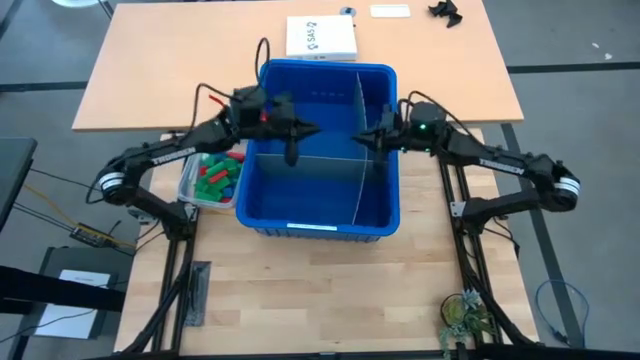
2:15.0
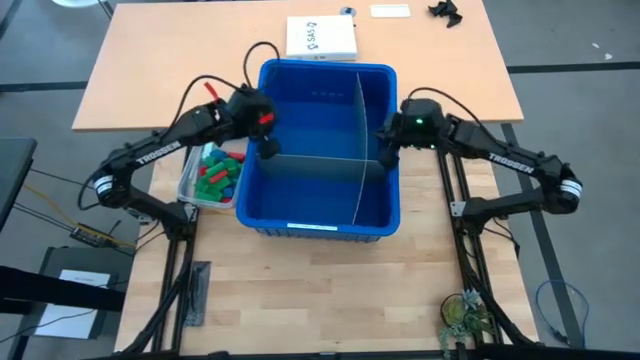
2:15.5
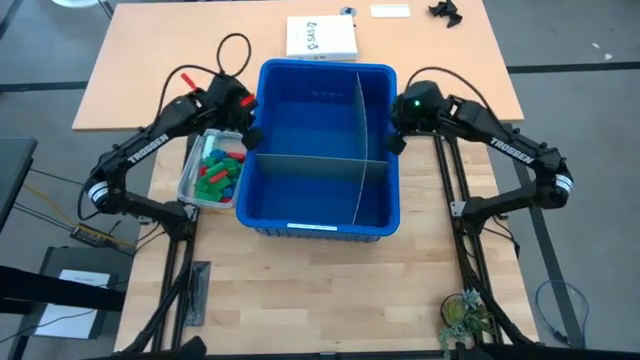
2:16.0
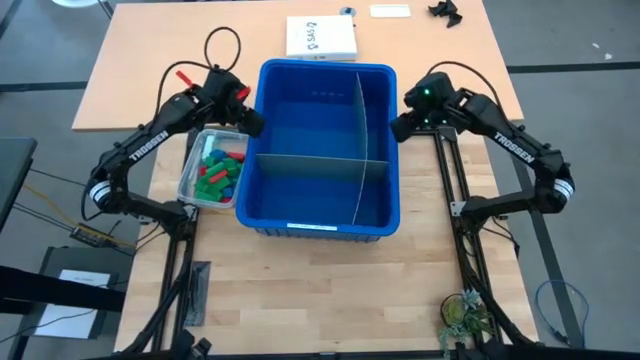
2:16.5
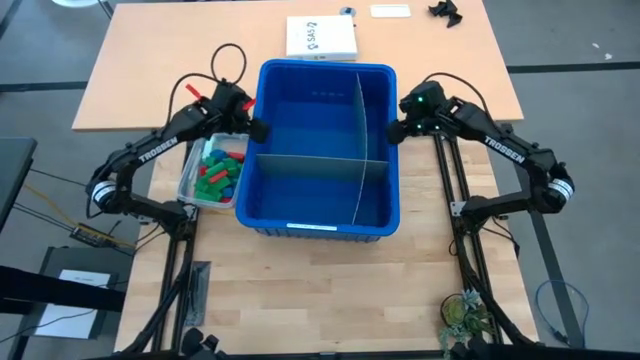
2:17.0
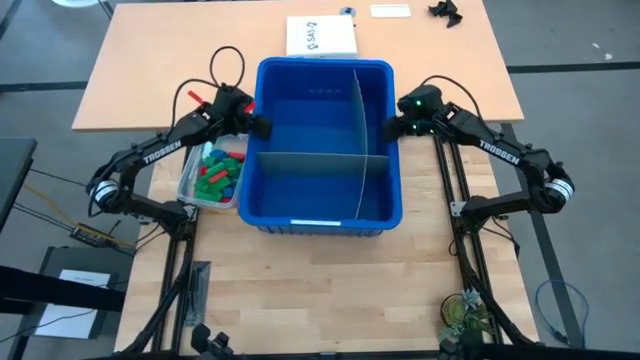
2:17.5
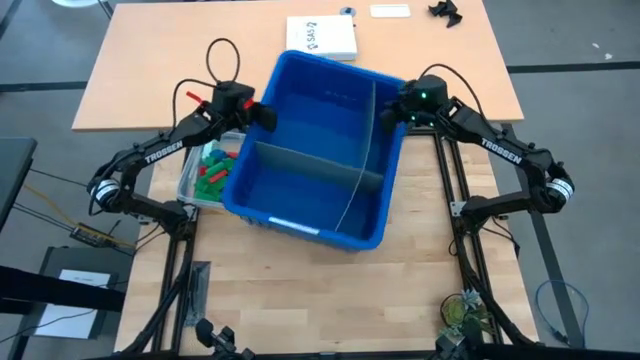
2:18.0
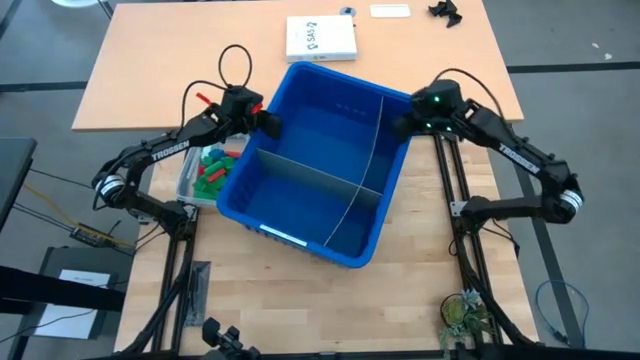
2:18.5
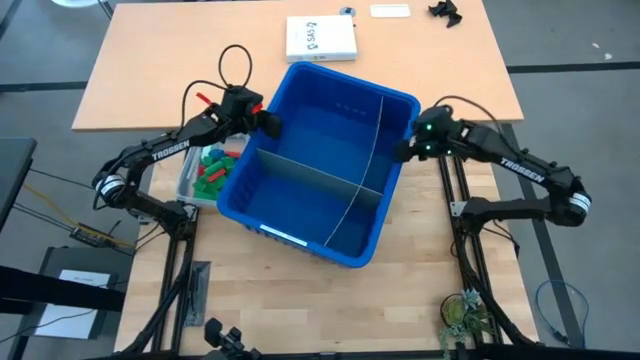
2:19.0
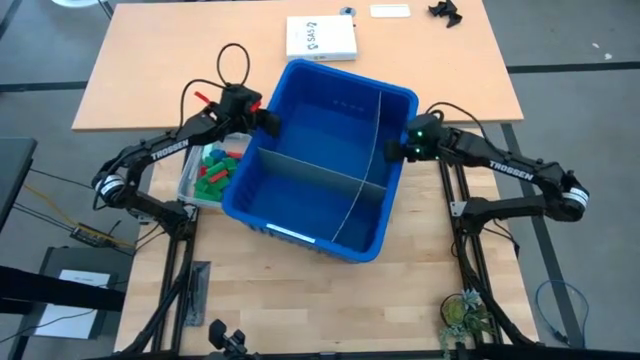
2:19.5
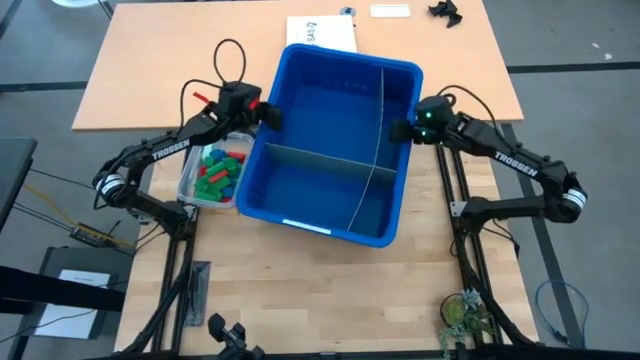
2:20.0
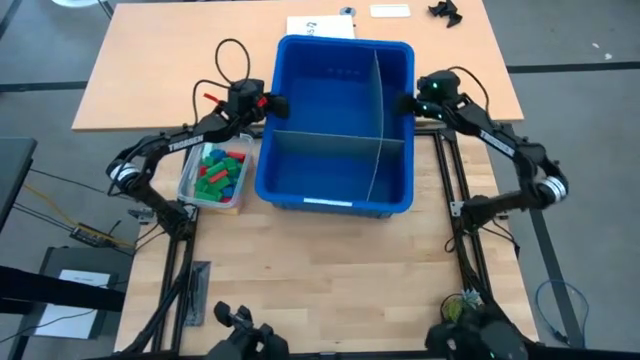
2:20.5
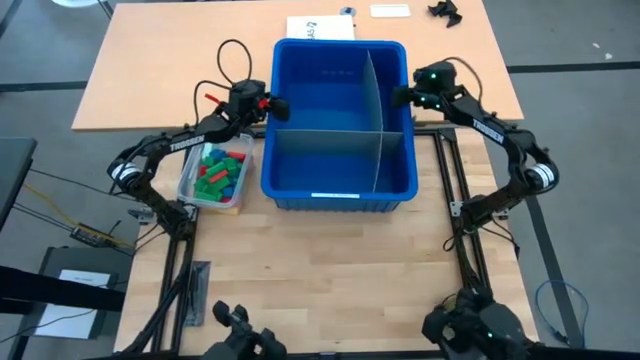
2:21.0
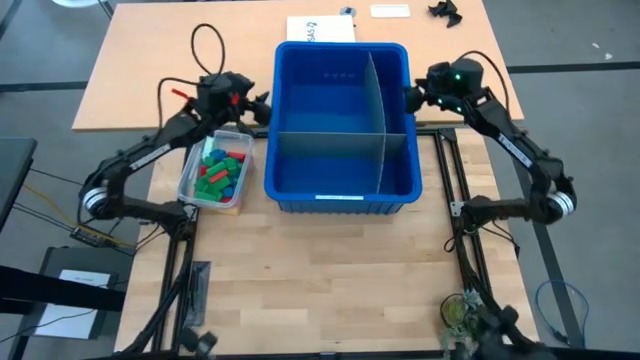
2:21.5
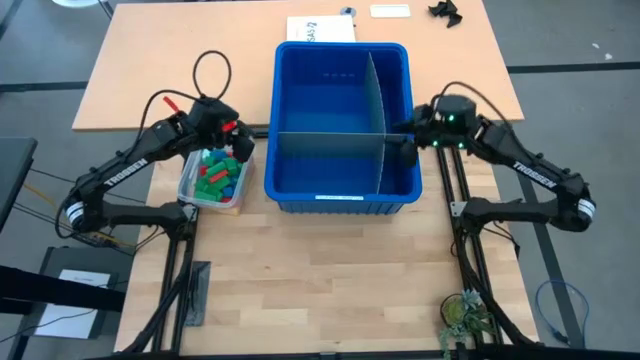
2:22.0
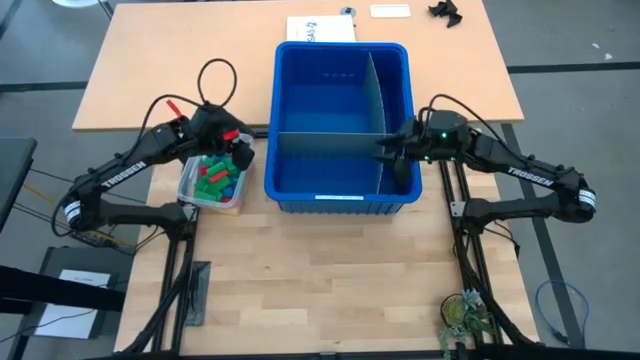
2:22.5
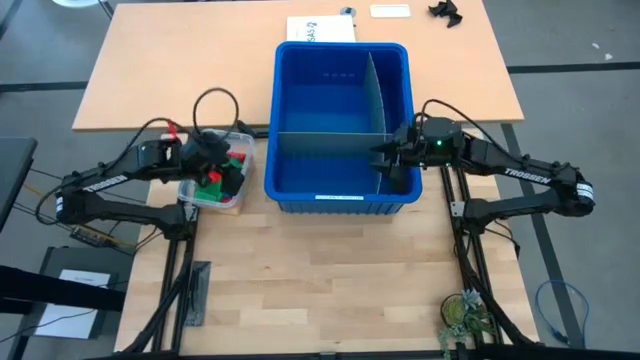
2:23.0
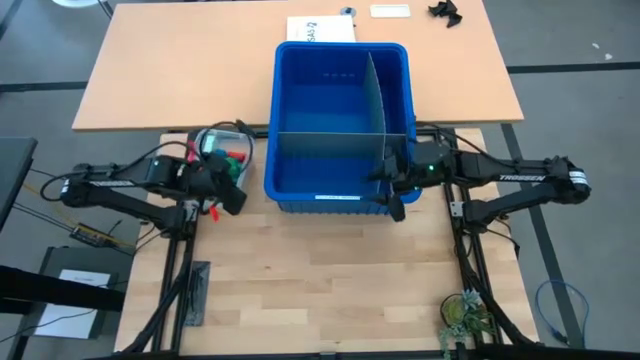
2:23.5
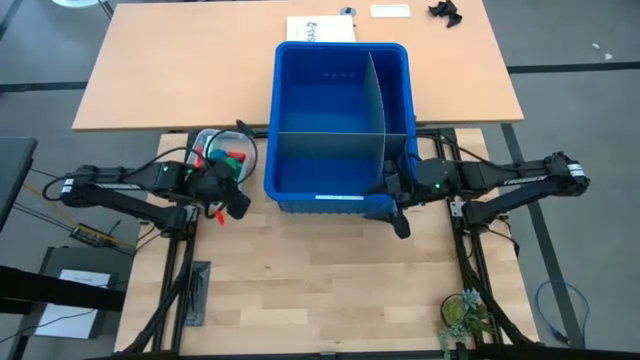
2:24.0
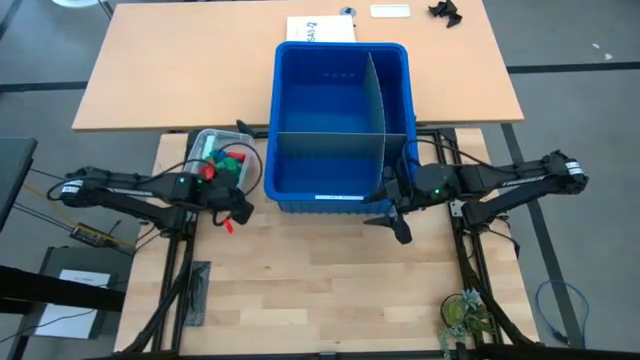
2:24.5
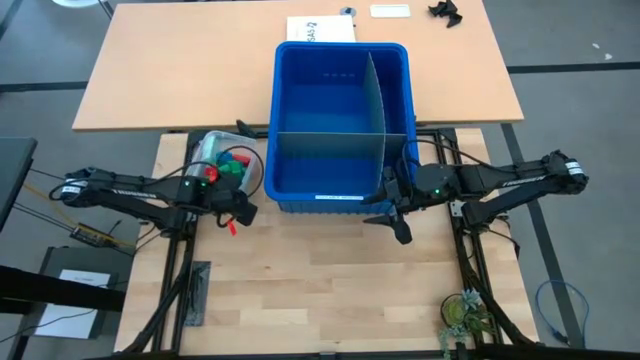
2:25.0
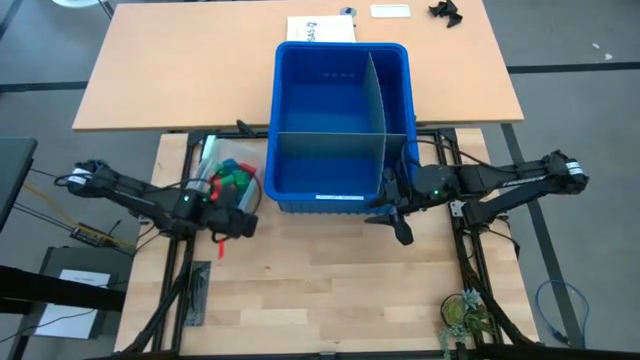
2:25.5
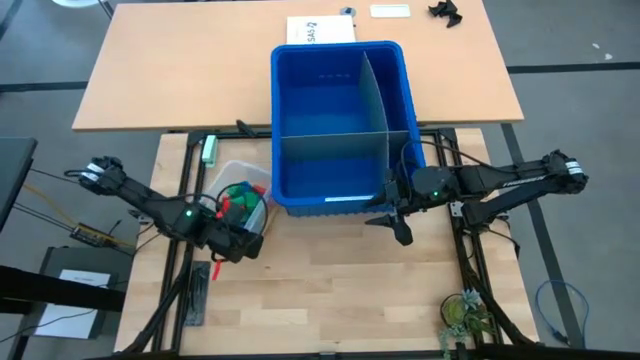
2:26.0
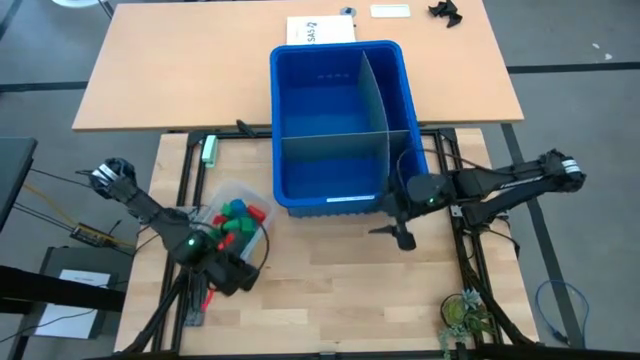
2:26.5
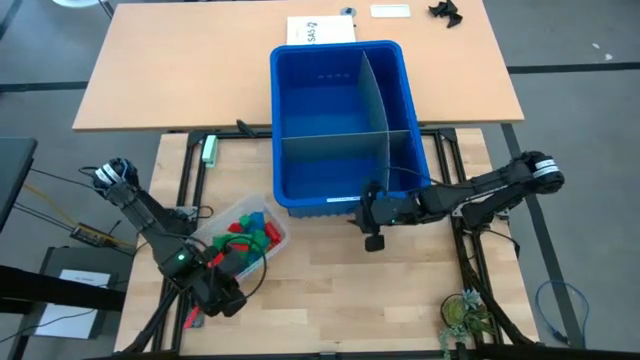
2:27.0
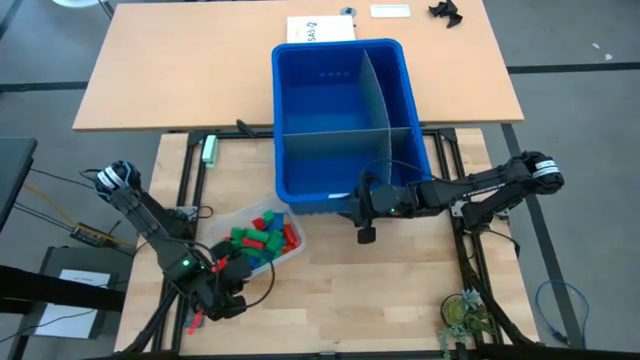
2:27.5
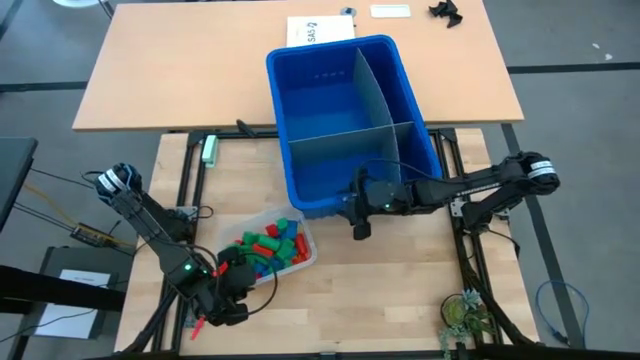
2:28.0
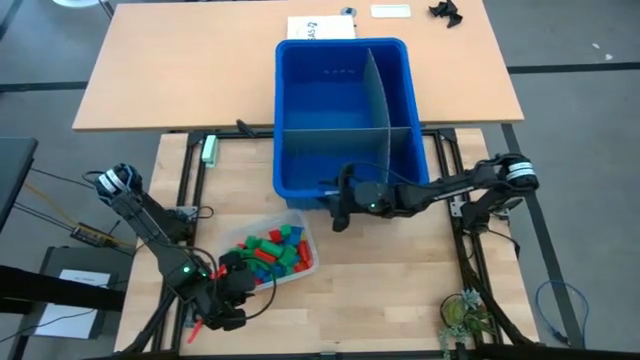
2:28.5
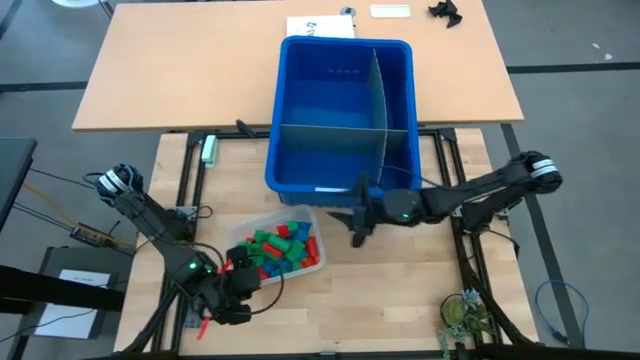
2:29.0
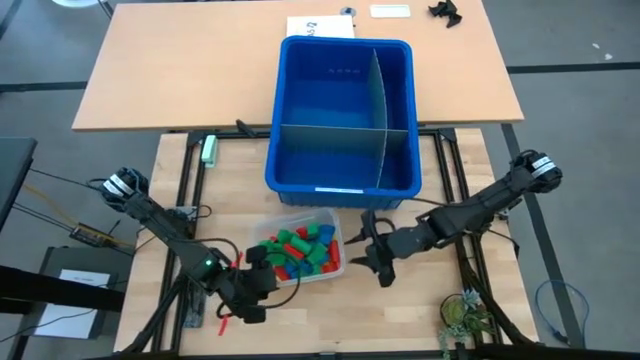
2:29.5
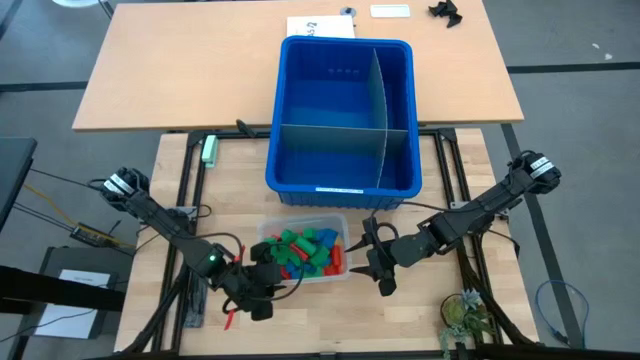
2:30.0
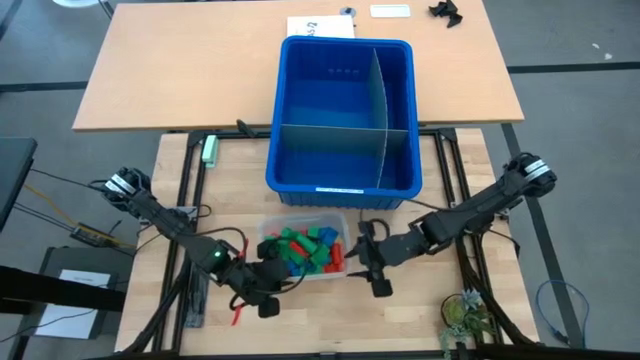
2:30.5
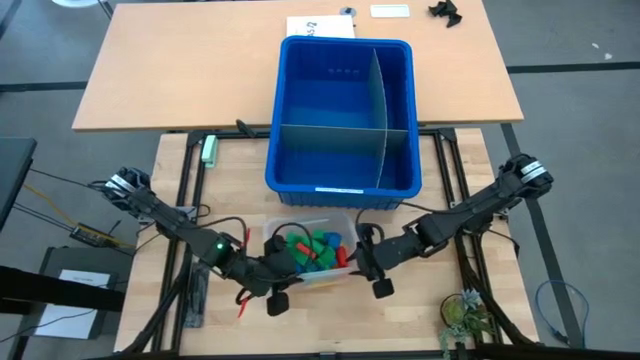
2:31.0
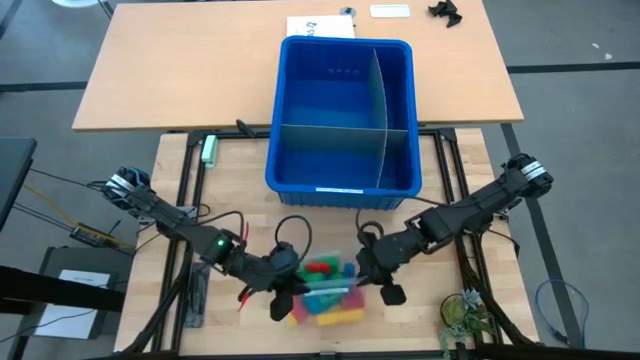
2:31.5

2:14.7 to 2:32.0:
Task: Sort blocks
Pour the blocks on the table from the transparent bin

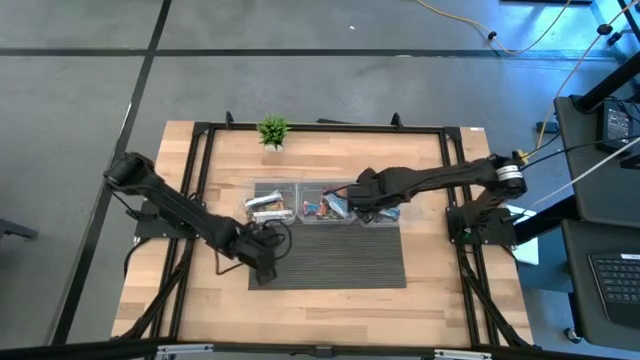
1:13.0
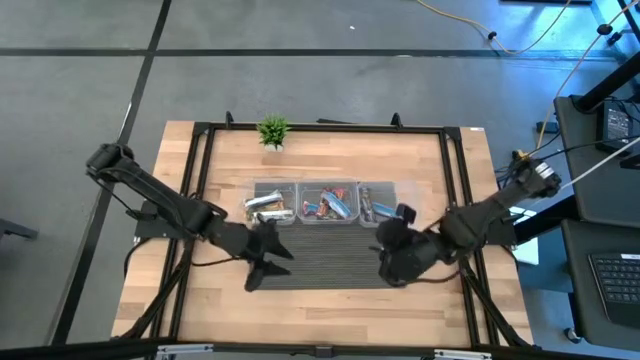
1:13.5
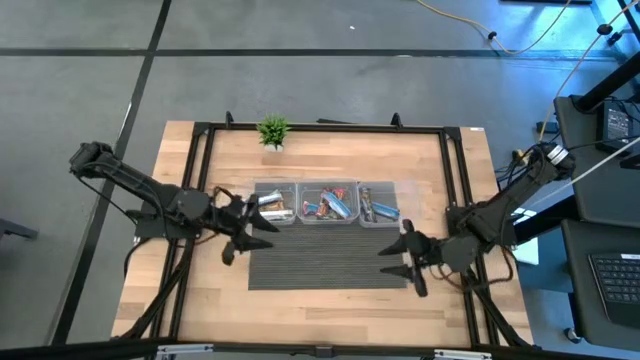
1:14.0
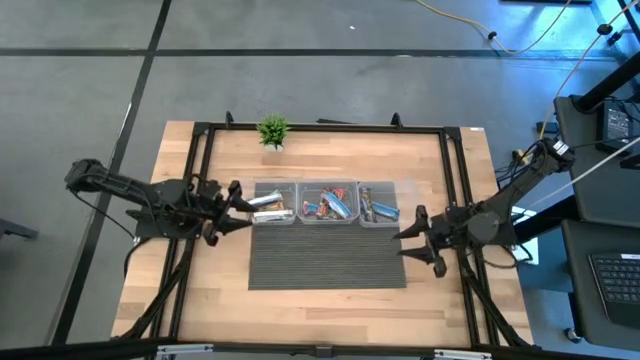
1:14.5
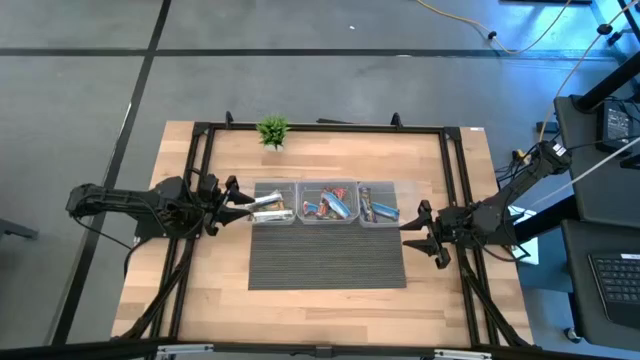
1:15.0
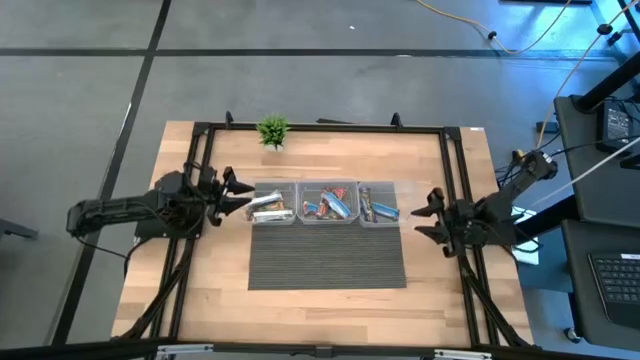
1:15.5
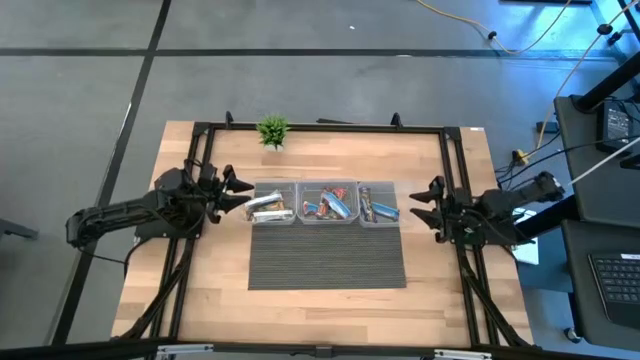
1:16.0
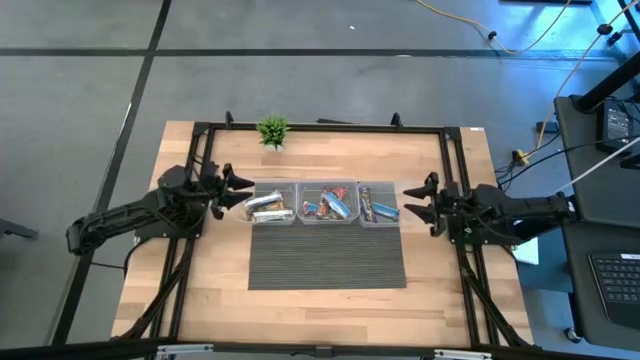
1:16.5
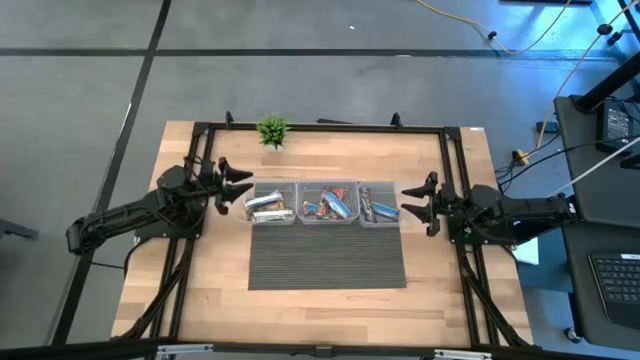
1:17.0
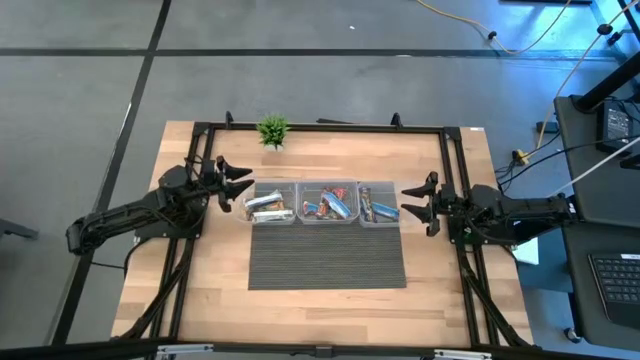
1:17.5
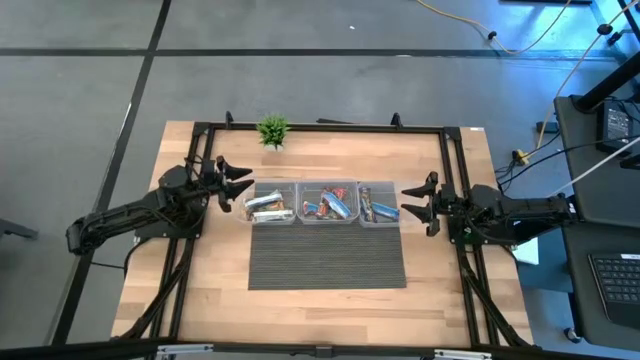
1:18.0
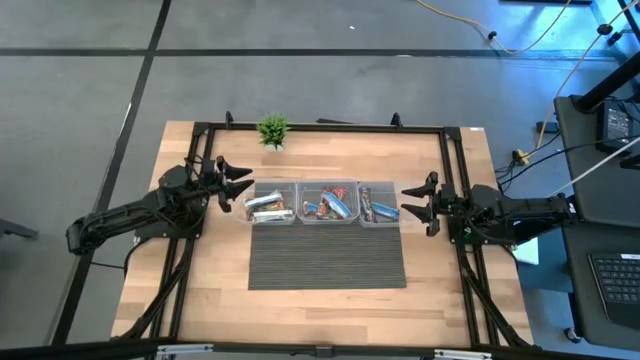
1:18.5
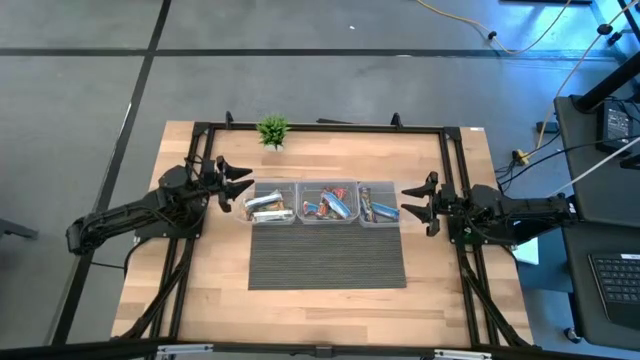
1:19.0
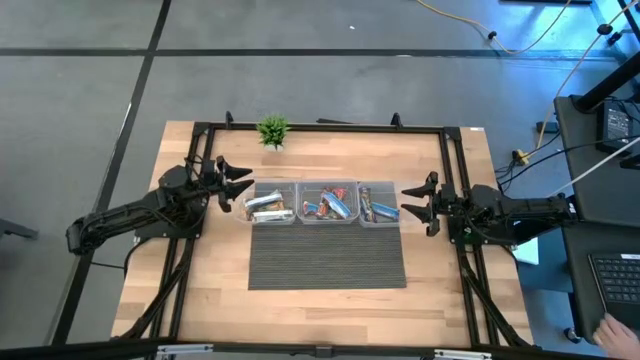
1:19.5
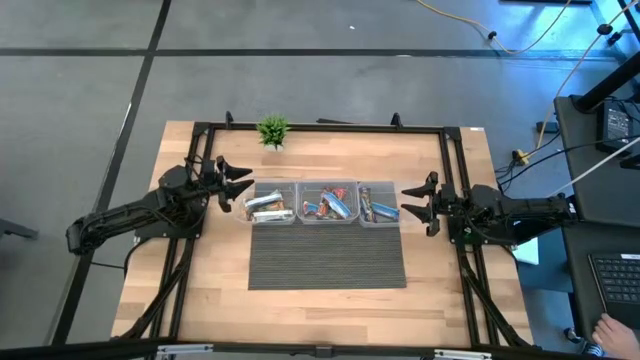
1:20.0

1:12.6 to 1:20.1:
Task: Pick and place Granola Bars by type
Return to Home Position
